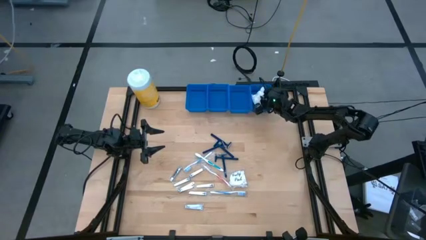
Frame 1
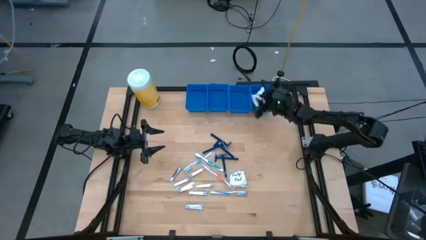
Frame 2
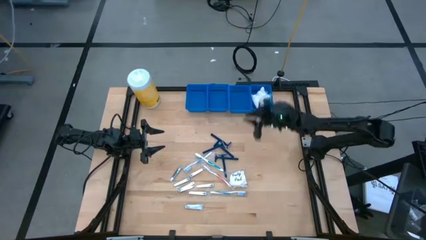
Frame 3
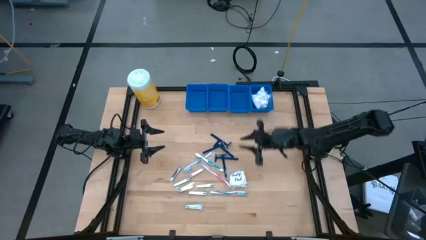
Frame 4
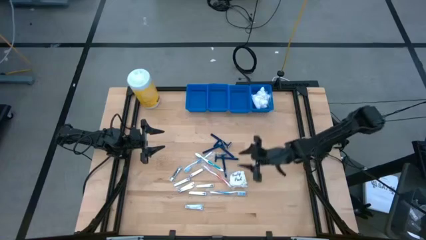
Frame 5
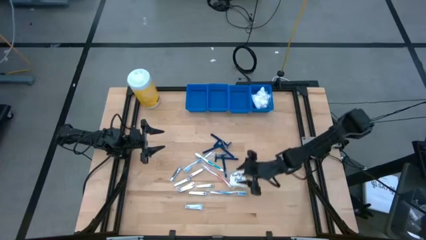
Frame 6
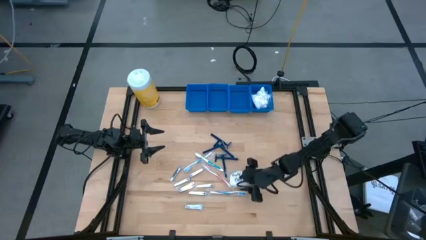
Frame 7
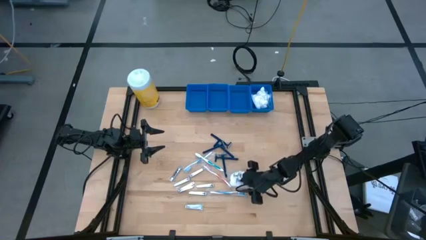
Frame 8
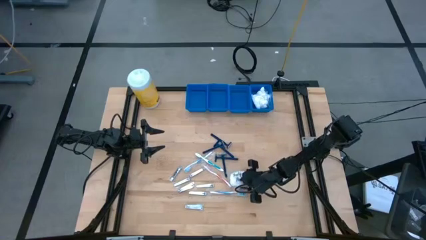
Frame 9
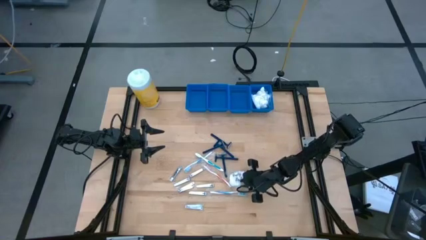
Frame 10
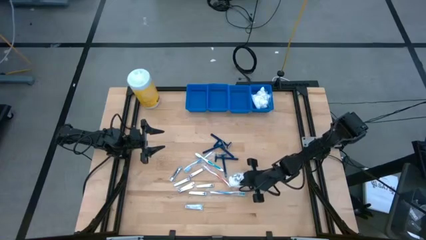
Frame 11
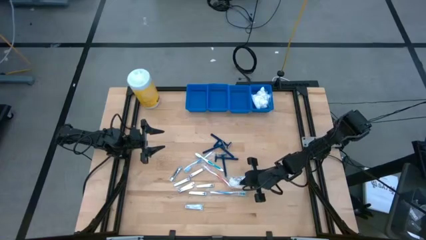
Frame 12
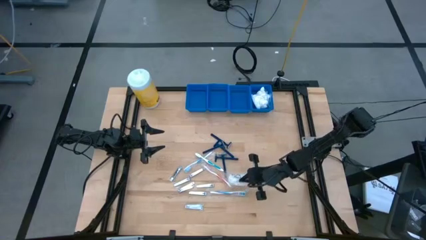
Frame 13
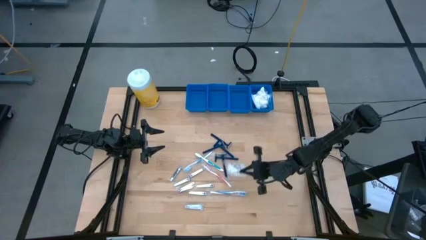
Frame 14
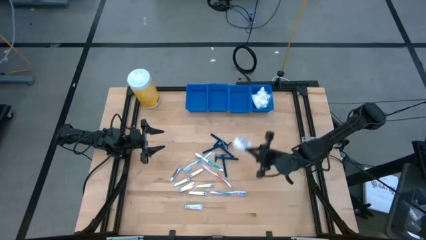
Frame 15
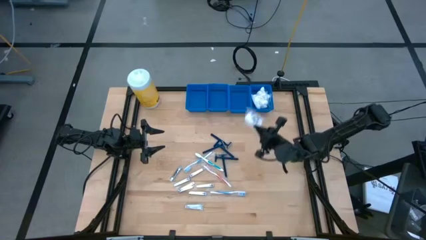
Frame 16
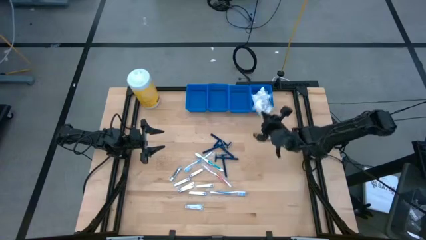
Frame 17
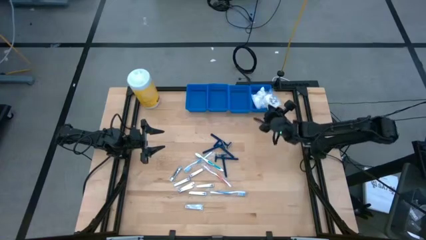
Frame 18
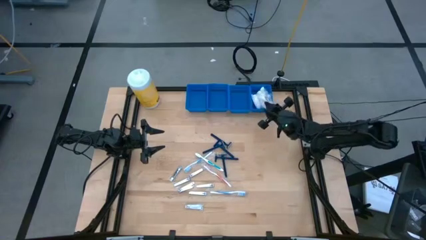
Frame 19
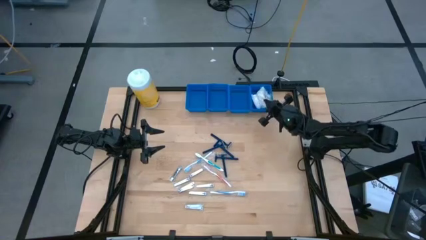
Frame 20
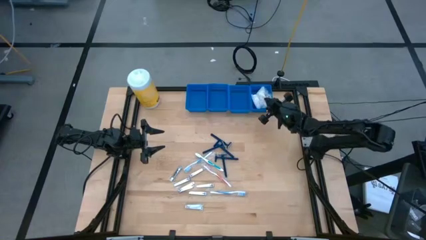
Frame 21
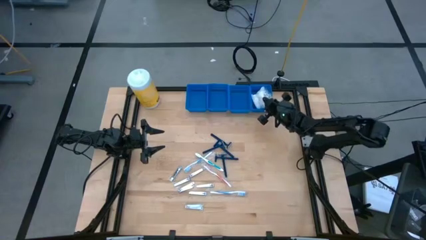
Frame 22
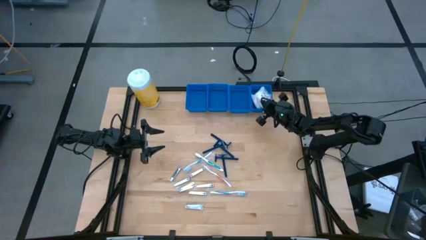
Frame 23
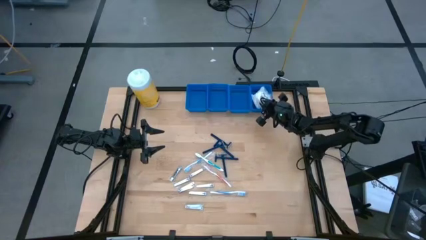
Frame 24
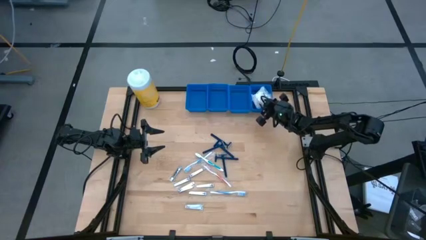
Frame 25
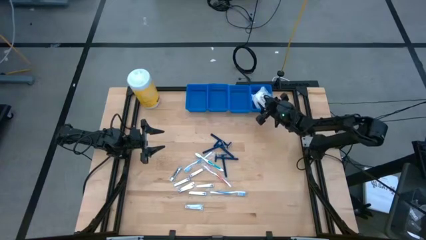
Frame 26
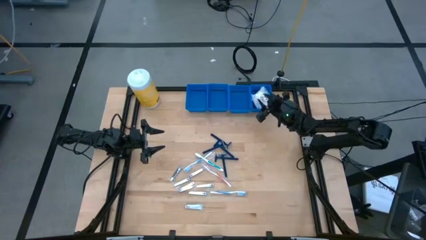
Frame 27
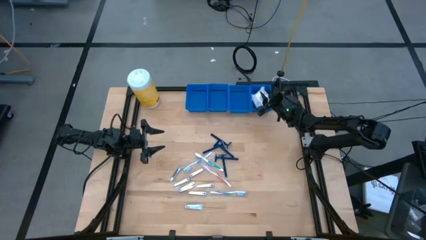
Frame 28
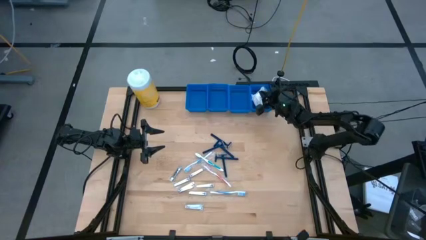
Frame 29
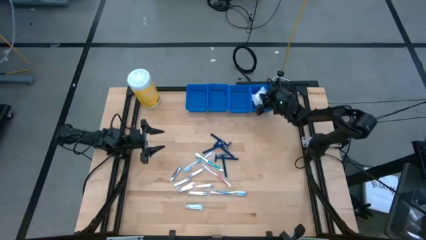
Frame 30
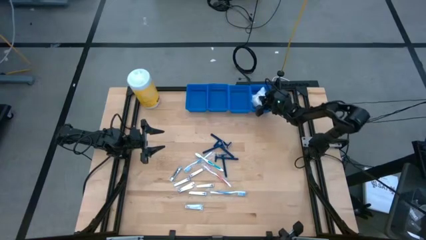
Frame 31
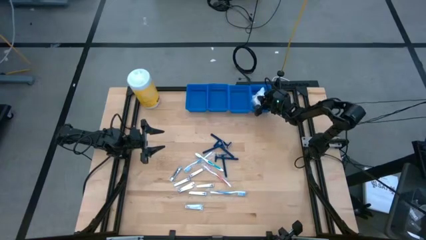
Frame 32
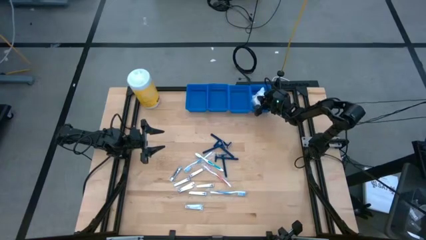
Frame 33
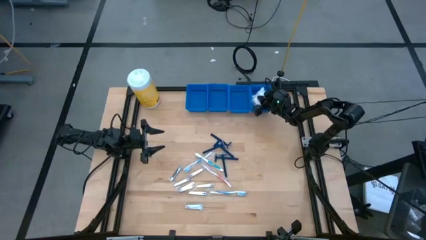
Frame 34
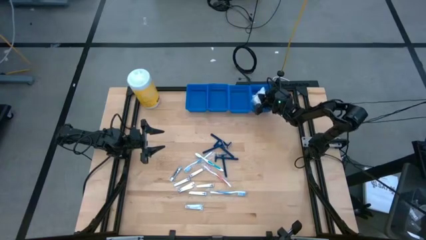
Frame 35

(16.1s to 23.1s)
Task: Pick & Place Travel size toiletries
Put the white cotton pack into the right blue basket

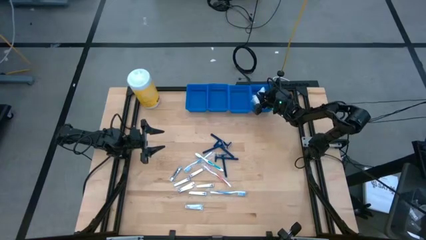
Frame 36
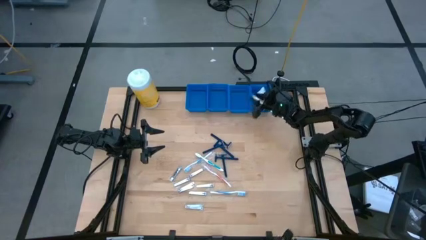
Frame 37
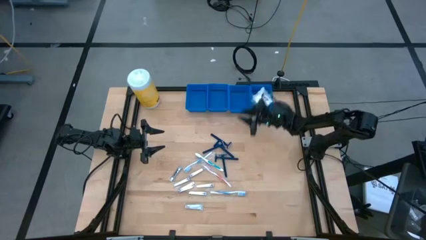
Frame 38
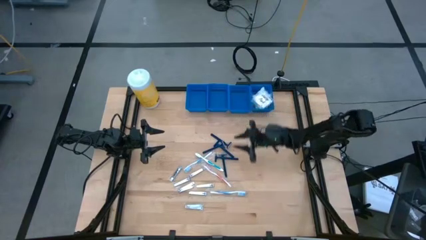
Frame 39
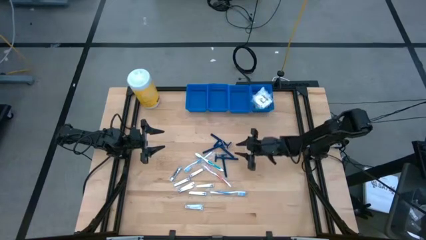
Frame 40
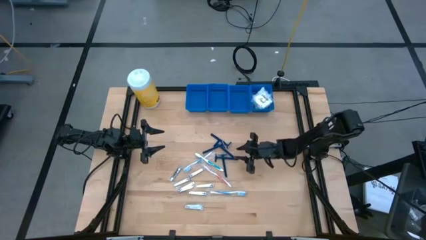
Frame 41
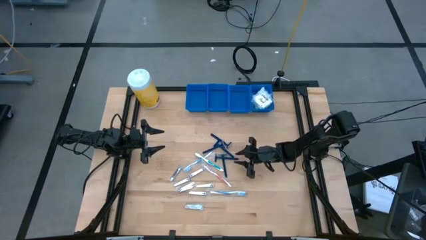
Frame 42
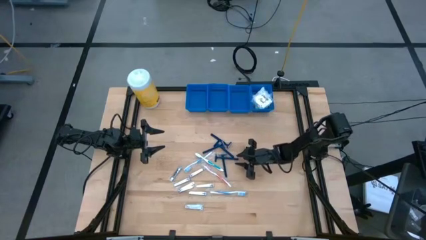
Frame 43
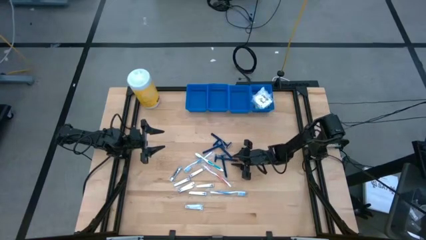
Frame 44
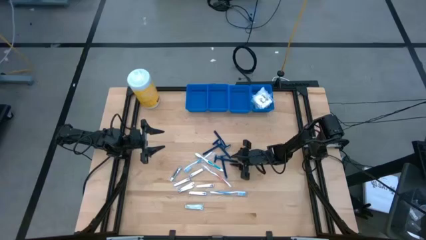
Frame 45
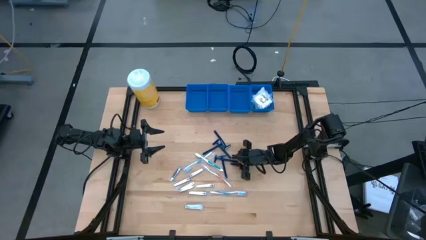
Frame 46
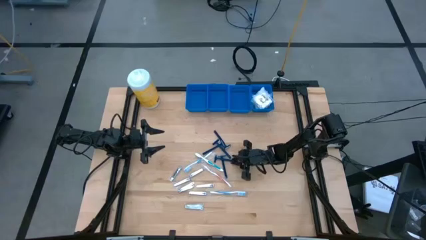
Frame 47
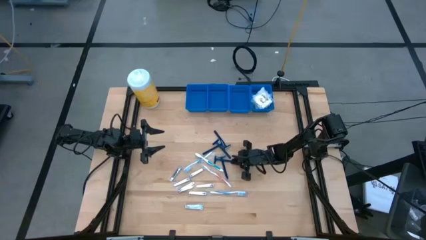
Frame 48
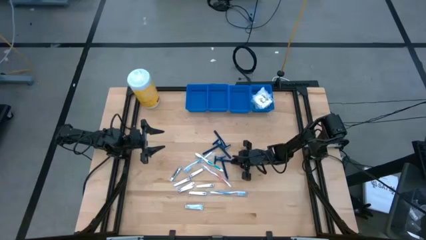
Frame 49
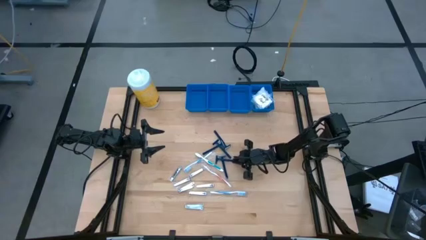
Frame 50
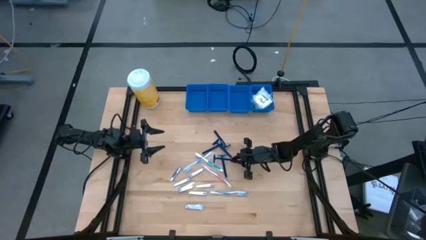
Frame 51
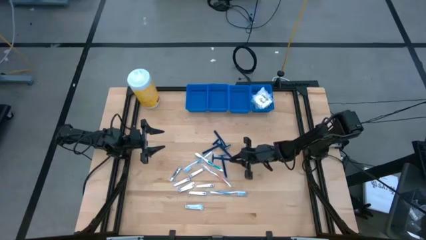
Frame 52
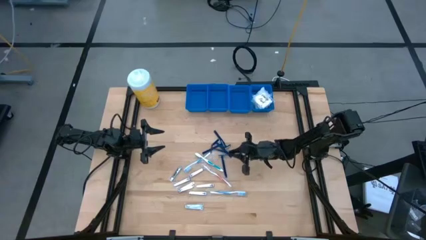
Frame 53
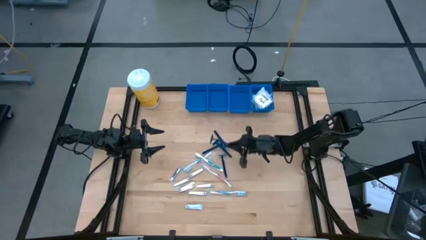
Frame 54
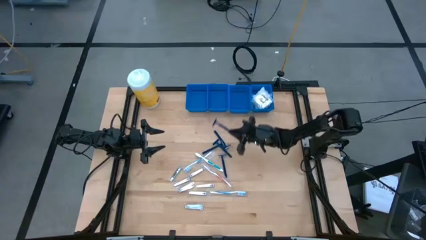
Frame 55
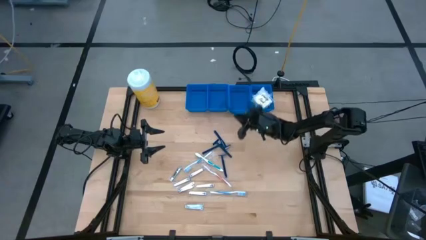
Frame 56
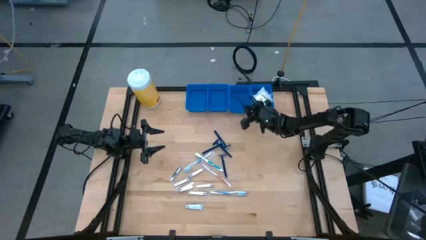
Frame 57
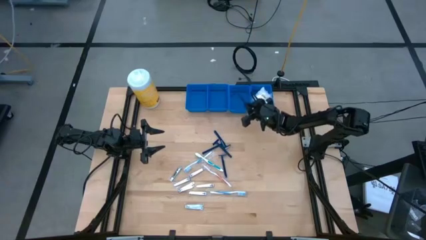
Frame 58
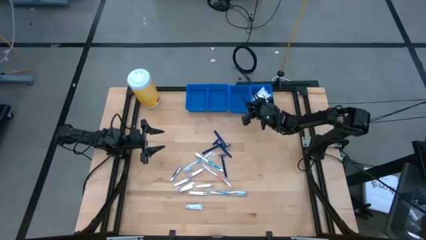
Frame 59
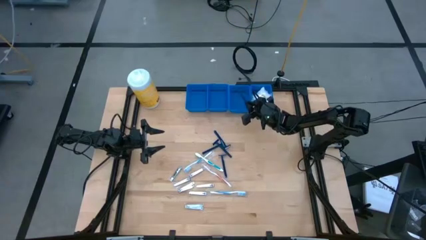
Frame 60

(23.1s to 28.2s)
Put the blue razor into the middle right blue basket

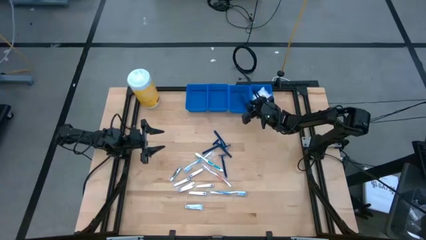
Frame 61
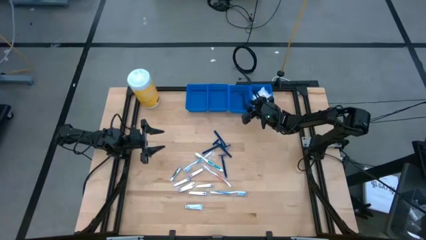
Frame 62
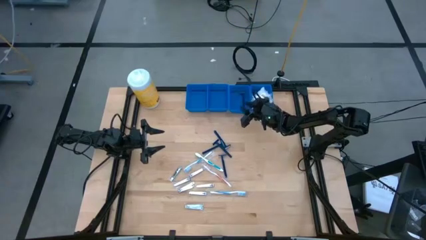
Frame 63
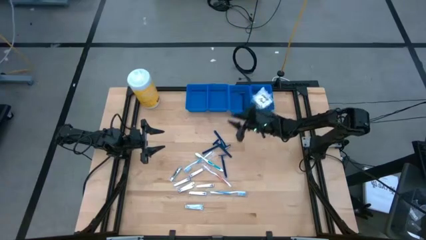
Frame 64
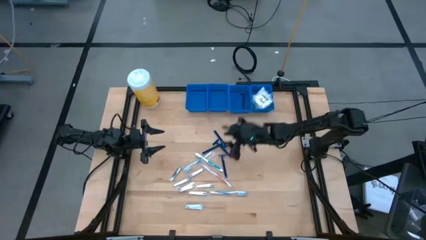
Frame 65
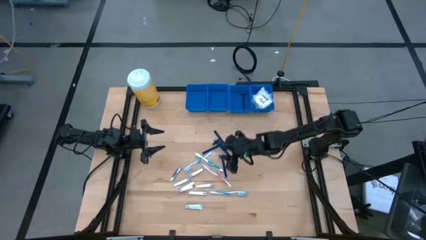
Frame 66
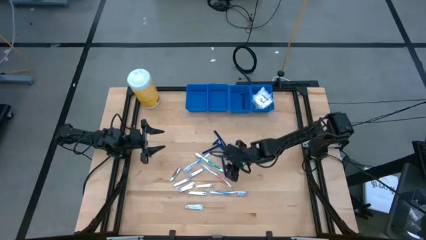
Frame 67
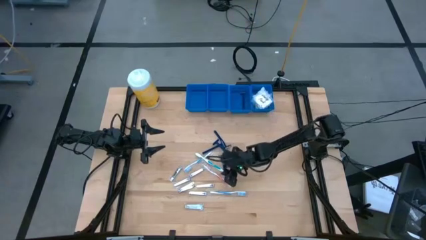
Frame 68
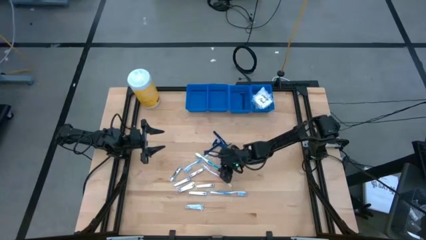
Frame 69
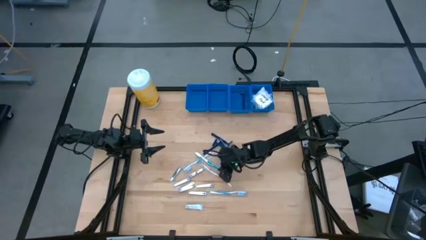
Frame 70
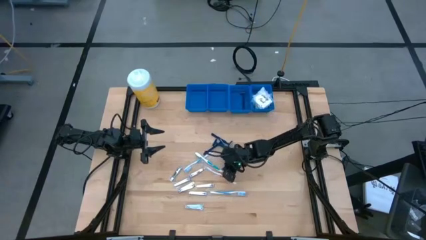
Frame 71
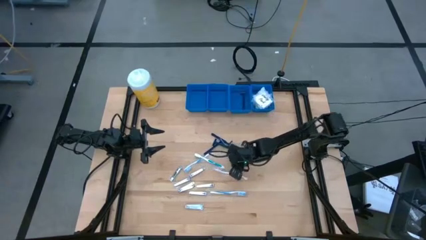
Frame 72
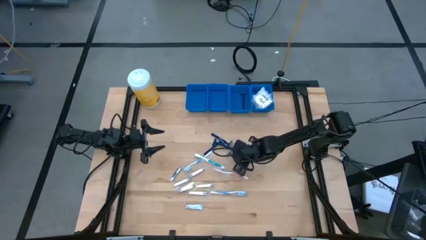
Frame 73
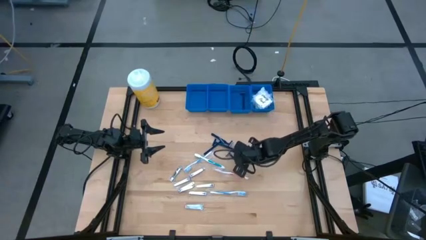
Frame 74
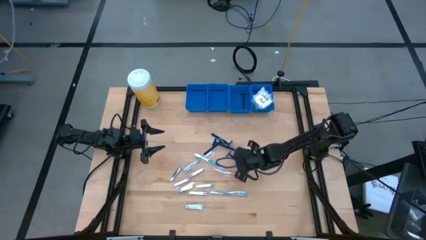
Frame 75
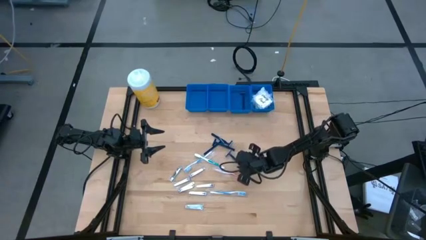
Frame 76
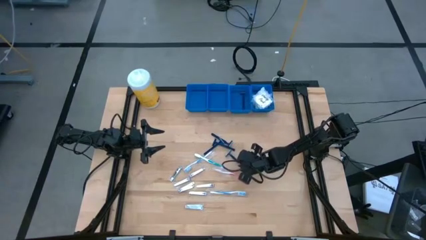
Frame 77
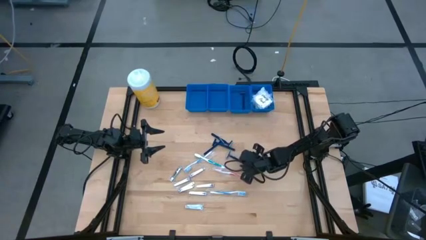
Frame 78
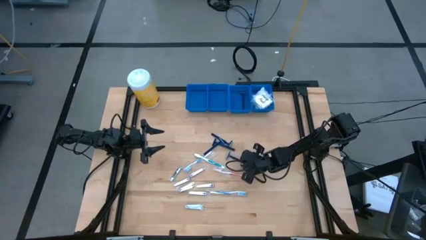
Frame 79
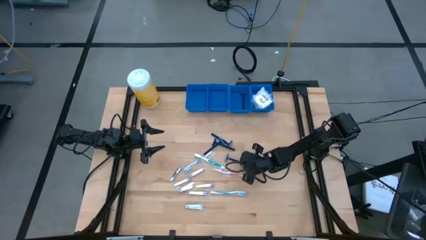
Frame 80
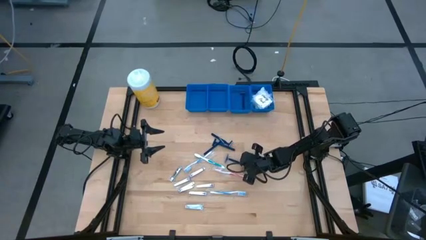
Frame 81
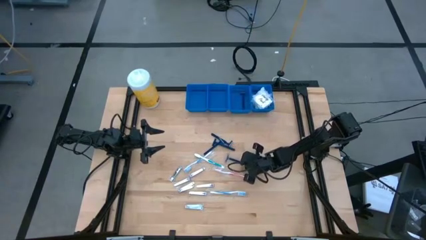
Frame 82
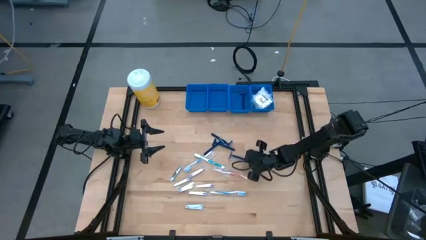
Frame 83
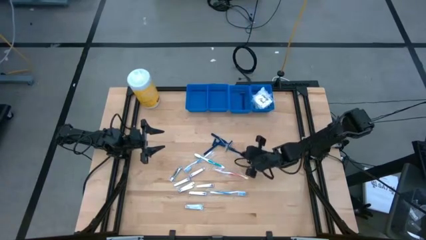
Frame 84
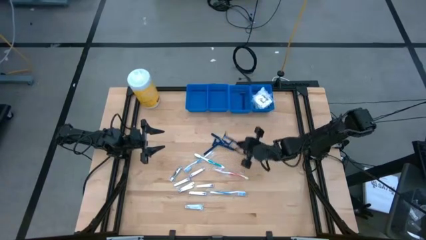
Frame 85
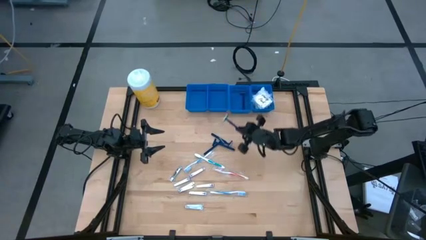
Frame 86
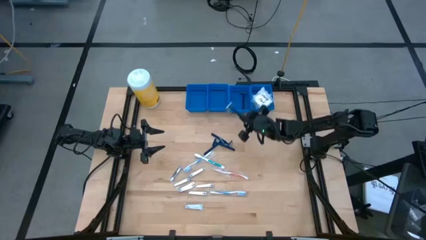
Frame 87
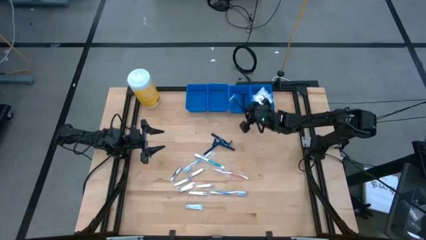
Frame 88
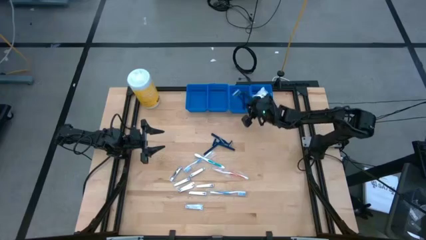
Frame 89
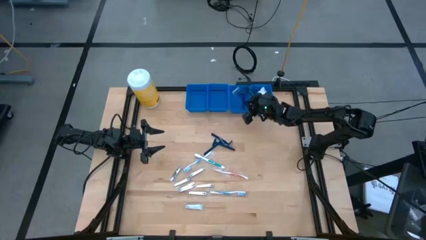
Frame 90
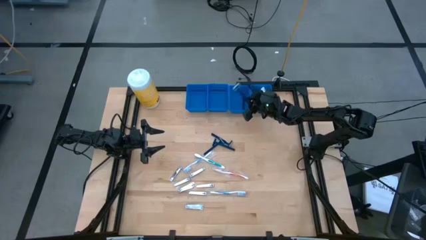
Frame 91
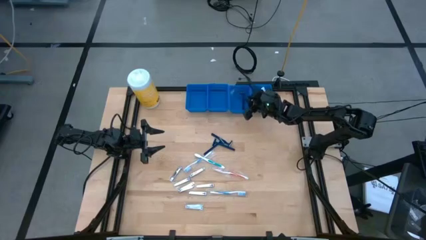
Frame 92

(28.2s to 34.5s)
Put the blue razor into the middle right blue basket
